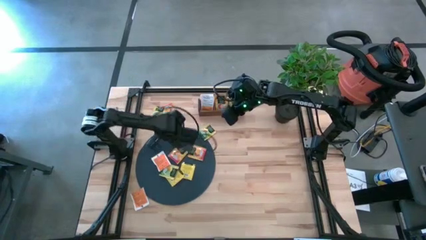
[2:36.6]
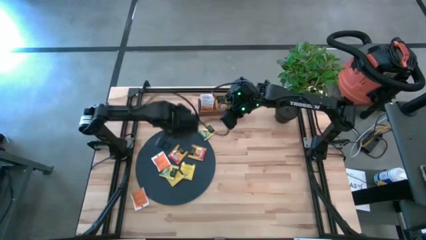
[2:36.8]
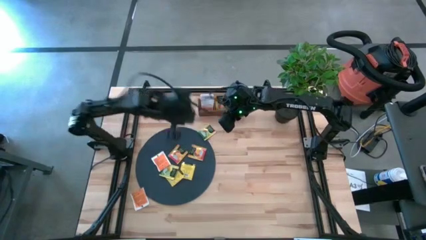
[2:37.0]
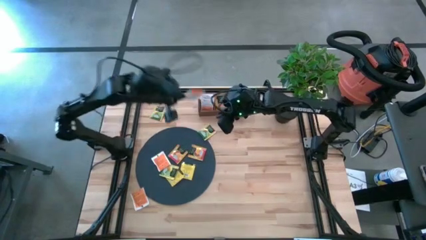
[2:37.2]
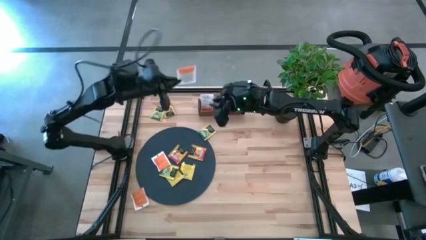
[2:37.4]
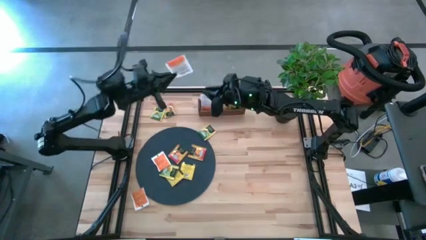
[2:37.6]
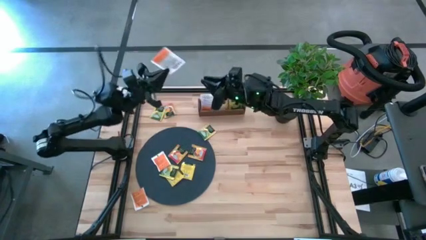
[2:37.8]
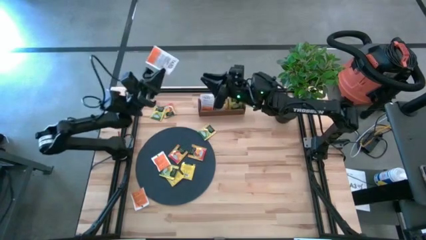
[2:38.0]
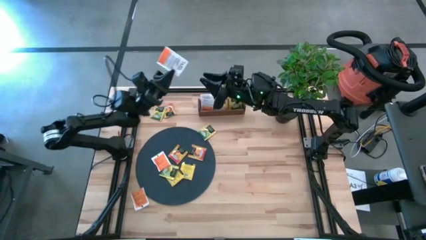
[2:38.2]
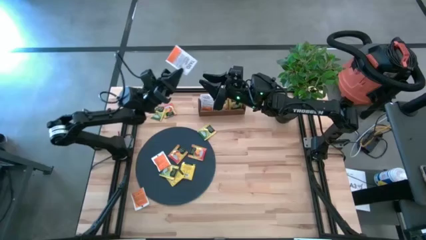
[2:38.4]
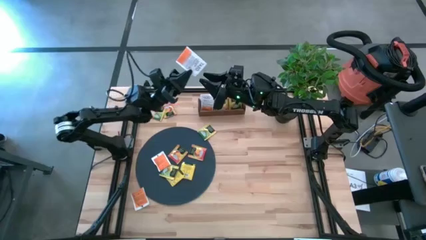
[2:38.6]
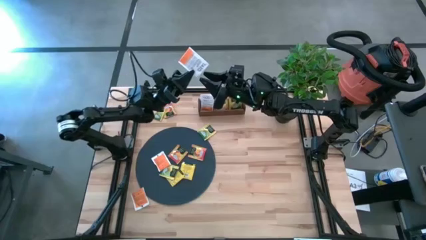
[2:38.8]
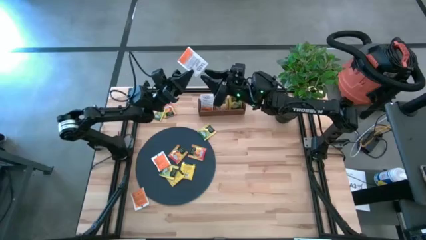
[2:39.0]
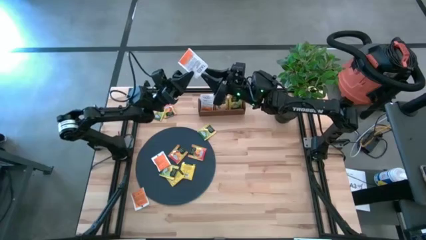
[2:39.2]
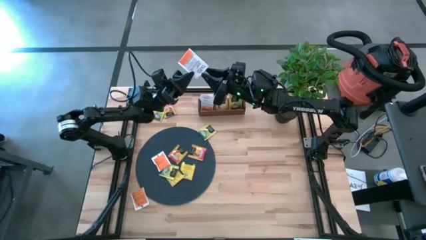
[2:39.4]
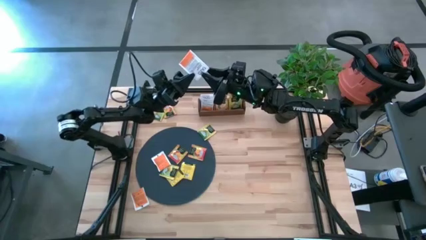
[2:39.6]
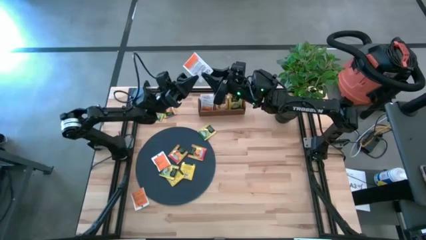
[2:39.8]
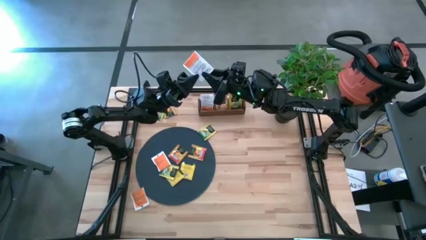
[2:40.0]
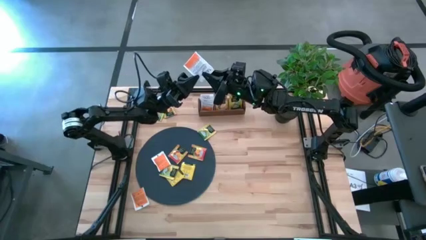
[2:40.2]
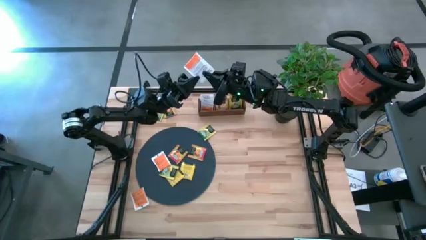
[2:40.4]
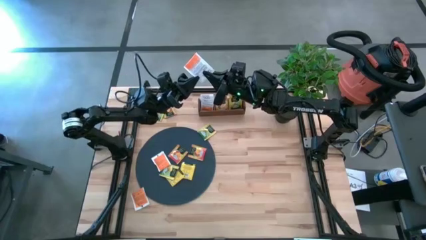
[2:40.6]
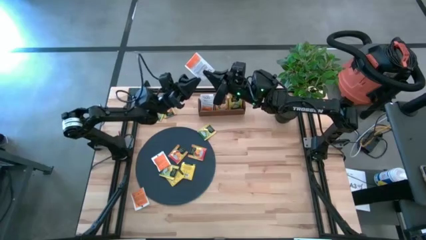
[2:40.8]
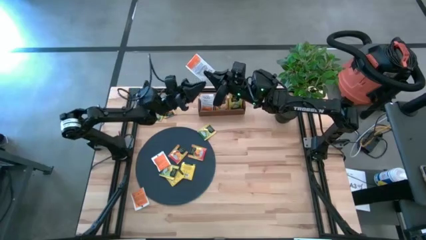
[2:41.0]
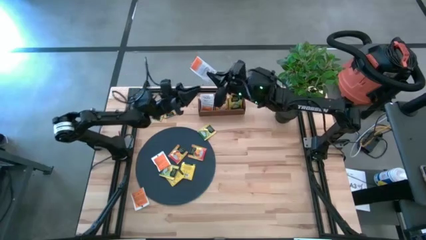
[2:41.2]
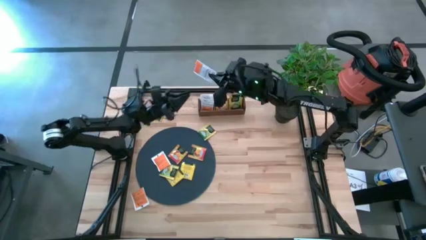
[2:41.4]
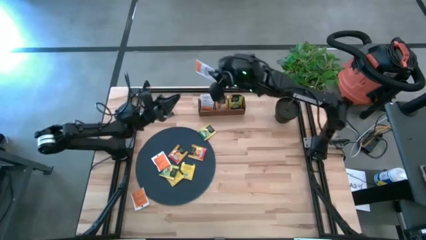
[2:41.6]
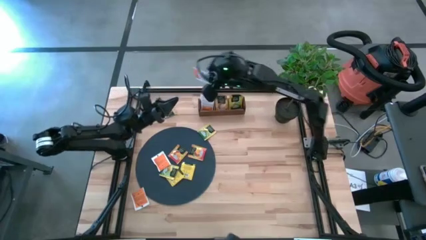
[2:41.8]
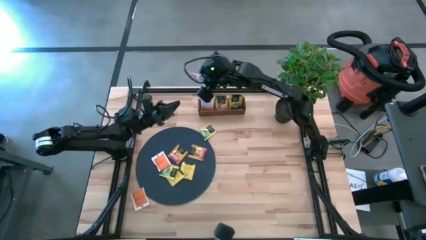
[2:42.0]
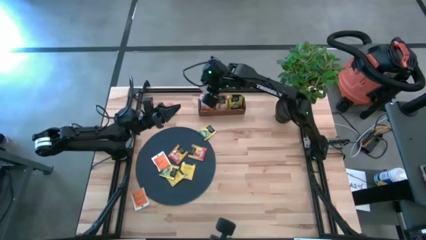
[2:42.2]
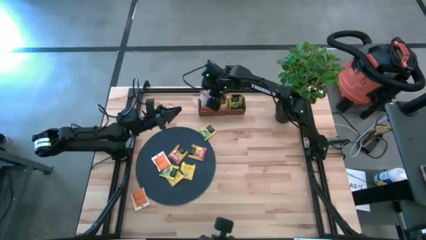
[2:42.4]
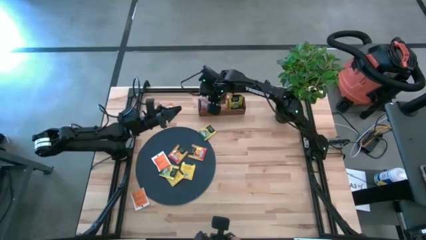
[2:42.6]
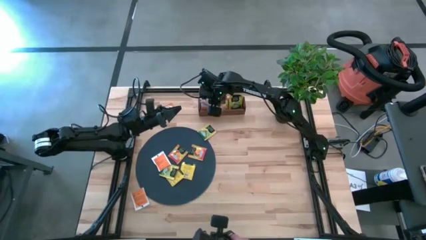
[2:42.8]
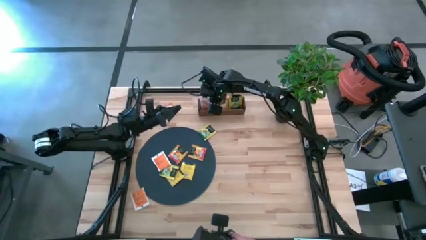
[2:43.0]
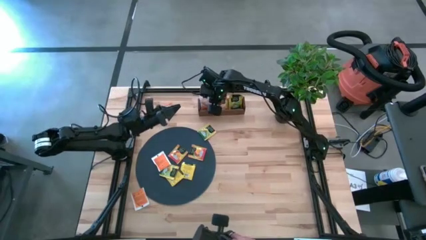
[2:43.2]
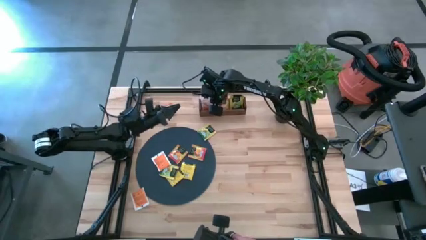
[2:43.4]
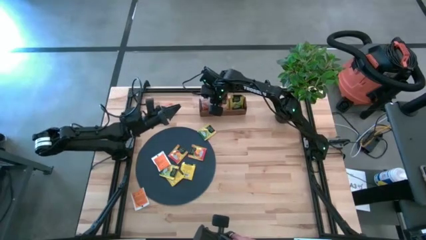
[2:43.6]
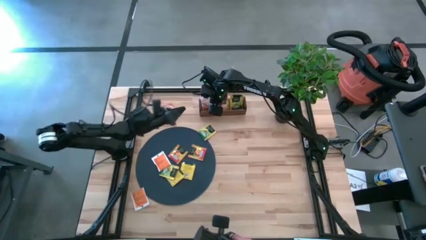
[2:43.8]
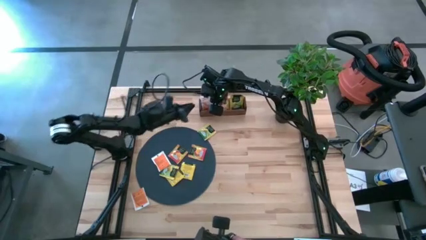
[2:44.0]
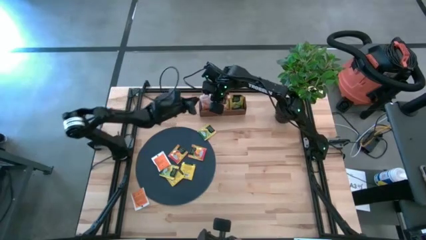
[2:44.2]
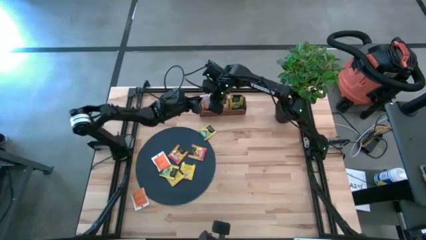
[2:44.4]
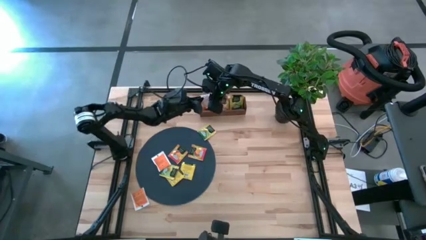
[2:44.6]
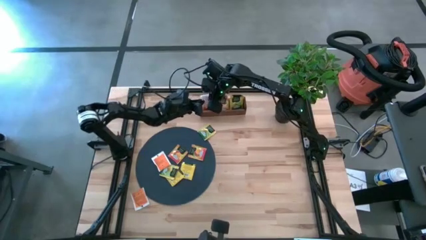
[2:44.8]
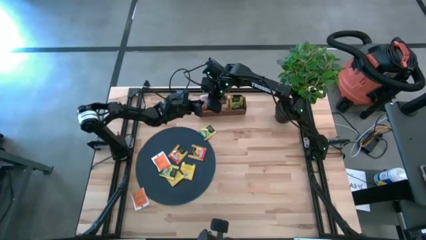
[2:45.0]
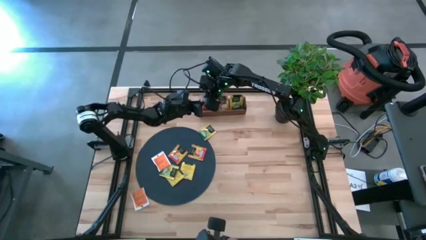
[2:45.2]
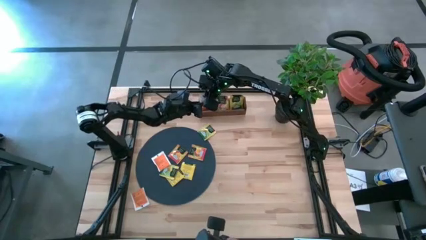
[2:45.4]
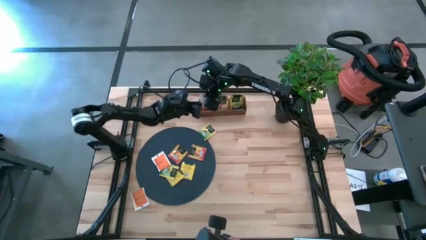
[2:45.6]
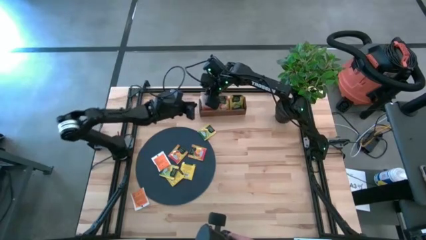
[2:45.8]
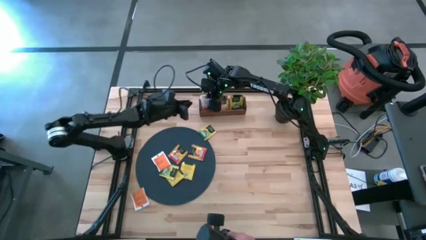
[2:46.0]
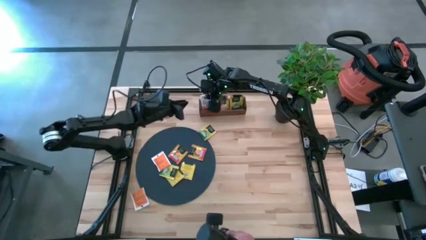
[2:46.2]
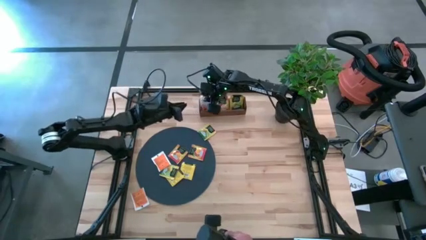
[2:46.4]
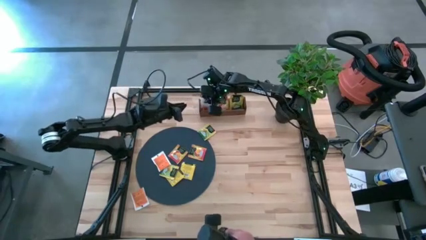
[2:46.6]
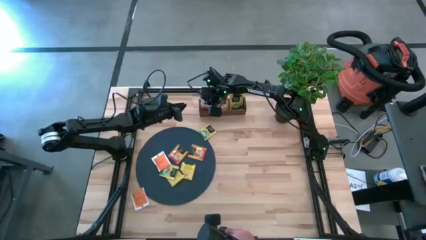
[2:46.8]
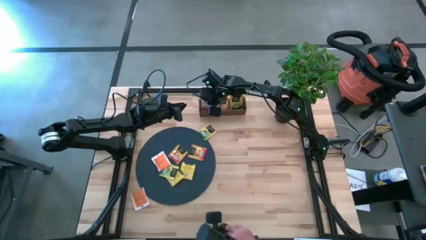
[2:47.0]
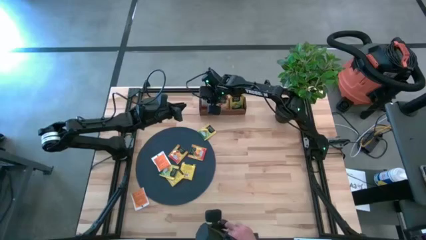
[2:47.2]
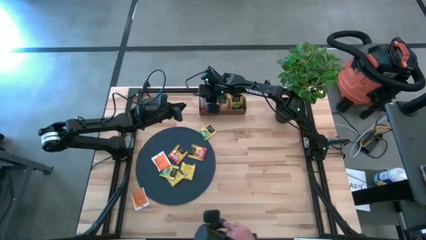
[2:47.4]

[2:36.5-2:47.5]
Task: Pick & Place Tea
Put the orange tea bag into the left section of the wooden organizer

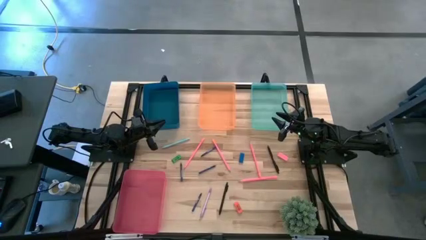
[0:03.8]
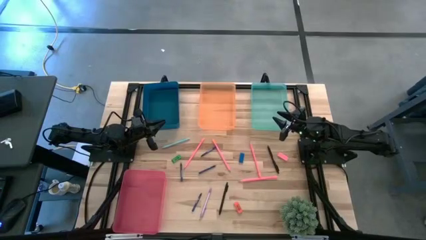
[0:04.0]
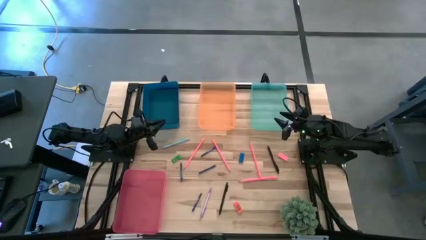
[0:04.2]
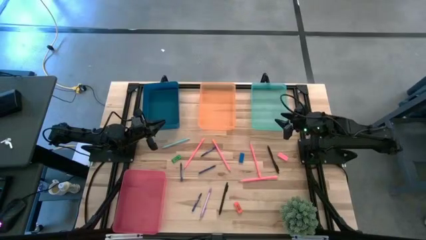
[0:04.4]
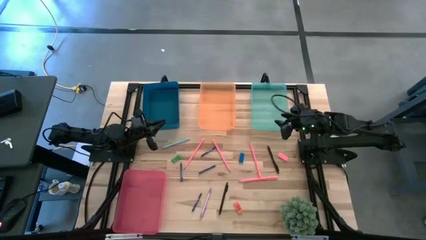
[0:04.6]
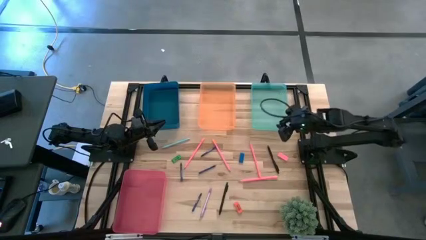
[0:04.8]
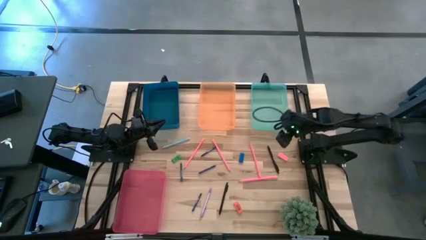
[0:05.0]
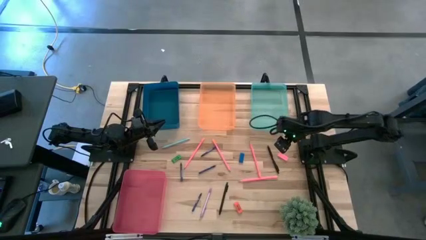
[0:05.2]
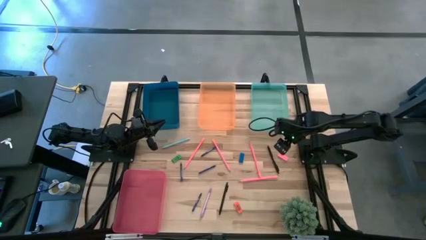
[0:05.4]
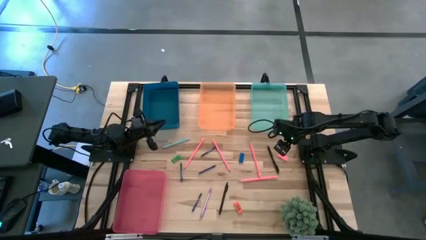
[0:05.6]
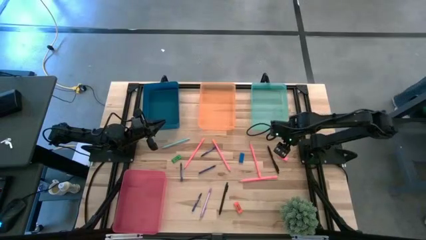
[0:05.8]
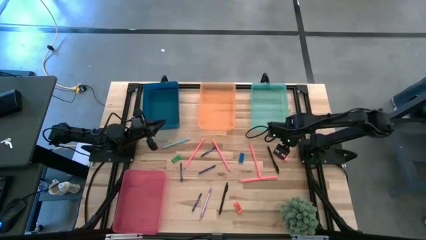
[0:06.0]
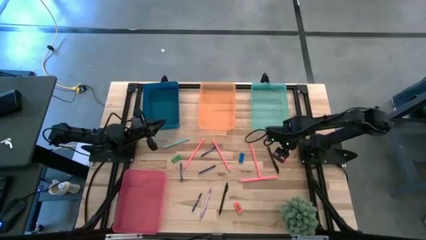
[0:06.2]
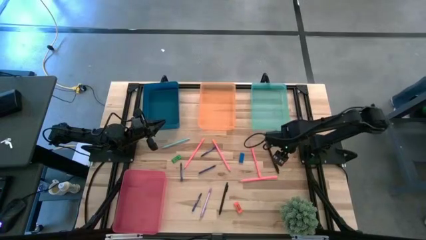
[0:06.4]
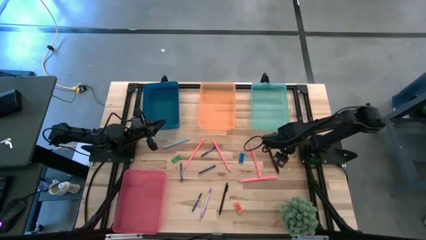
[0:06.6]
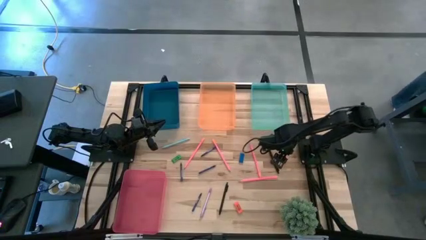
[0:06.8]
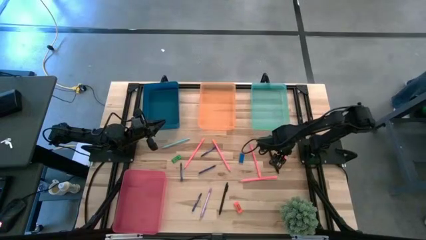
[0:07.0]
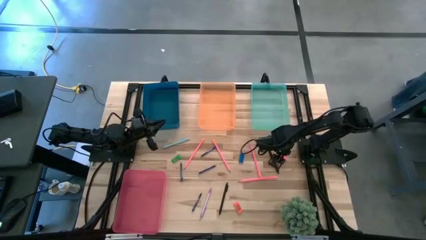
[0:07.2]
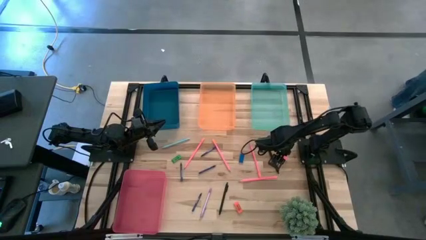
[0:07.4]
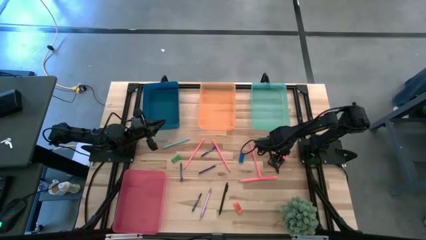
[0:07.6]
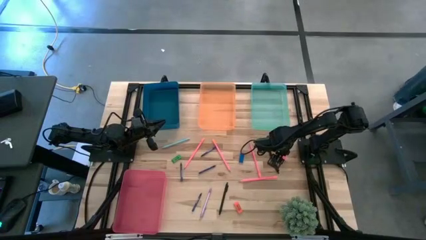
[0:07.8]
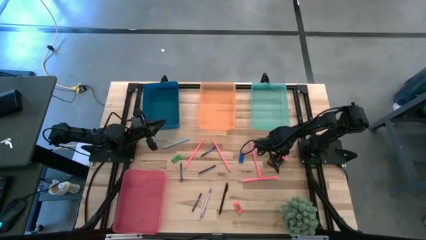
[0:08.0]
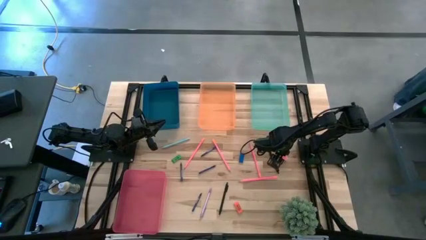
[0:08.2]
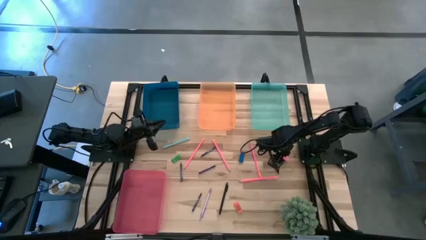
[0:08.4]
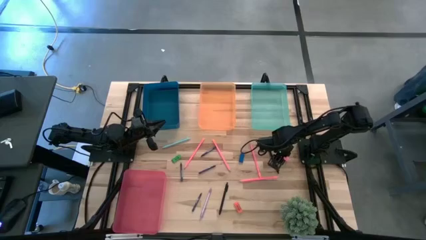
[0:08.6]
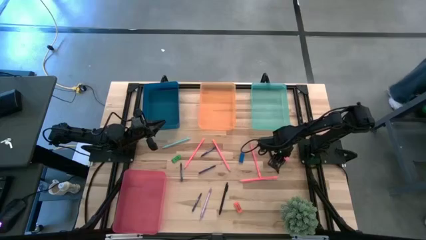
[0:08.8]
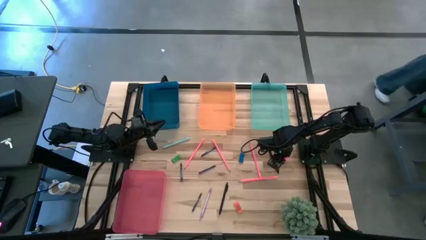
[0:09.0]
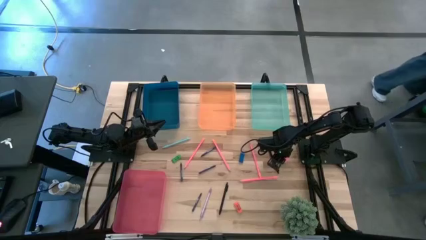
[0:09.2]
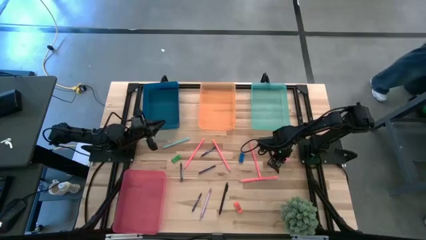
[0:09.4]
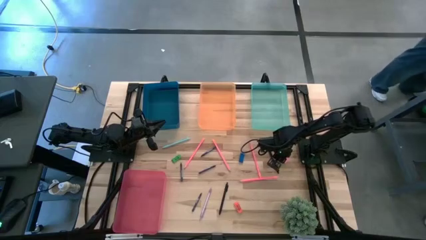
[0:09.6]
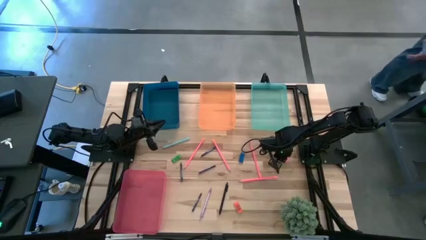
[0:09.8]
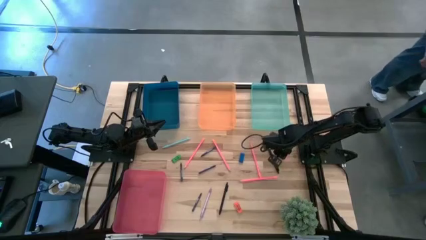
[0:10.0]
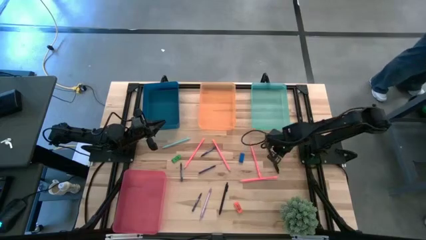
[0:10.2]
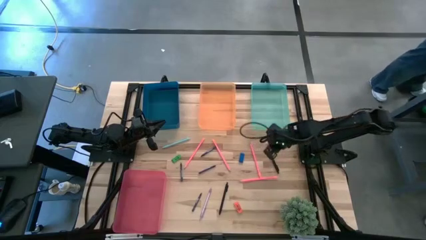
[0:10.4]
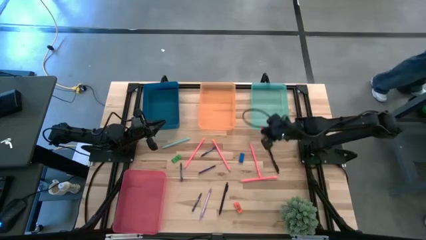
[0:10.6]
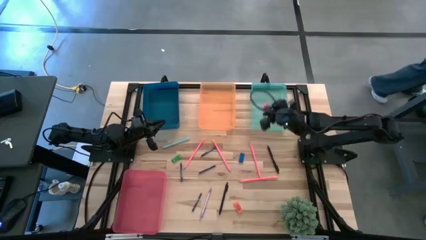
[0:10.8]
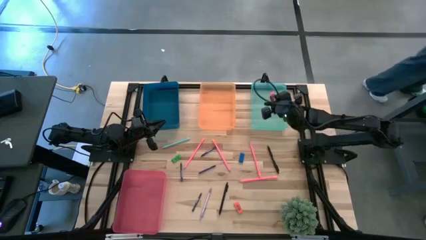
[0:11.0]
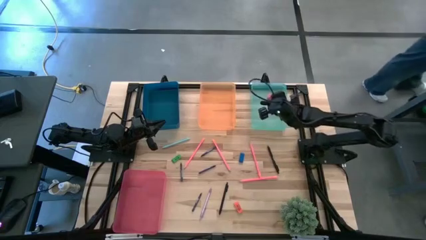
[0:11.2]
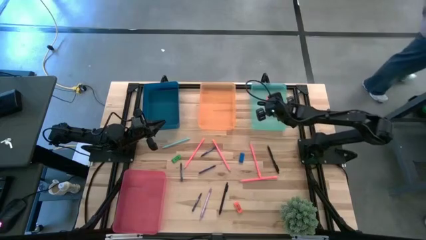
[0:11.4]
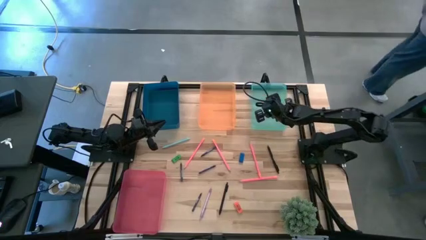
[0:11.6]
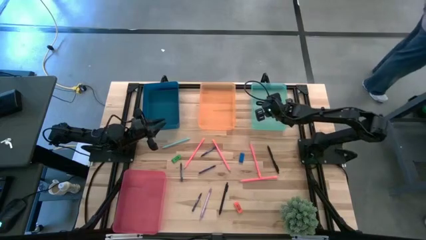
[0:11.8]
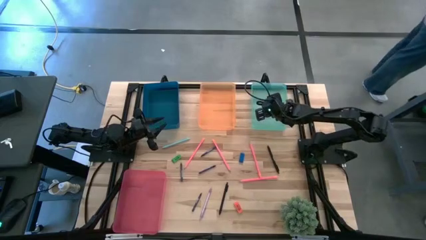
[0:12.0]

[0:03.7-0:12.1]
Task: Sort crayons/erasers/pens/pencils in bins
Put the pink eraser into the green bin
